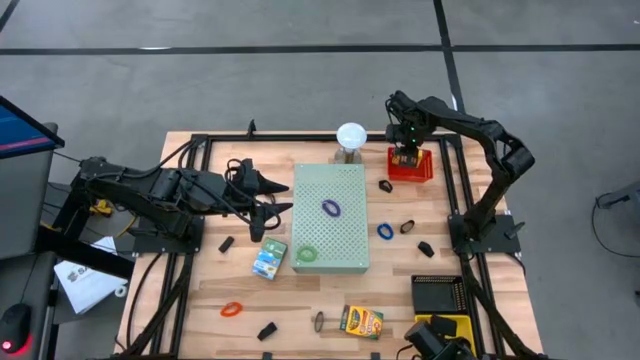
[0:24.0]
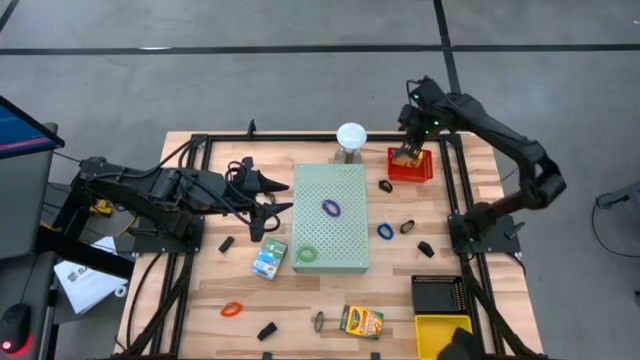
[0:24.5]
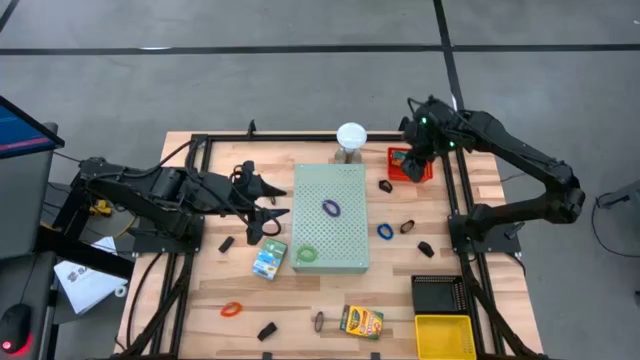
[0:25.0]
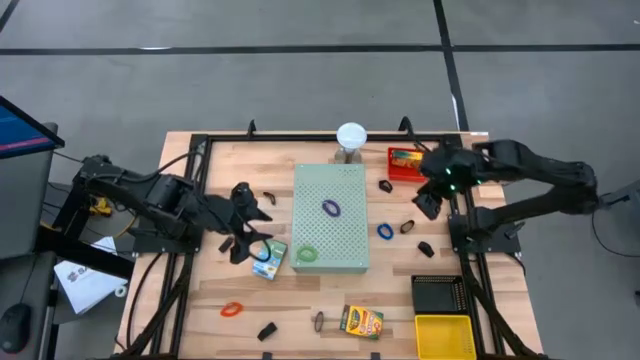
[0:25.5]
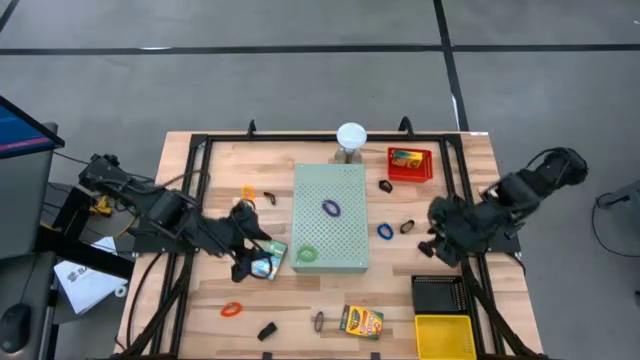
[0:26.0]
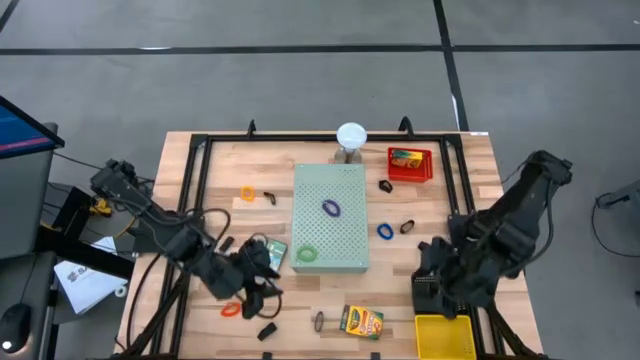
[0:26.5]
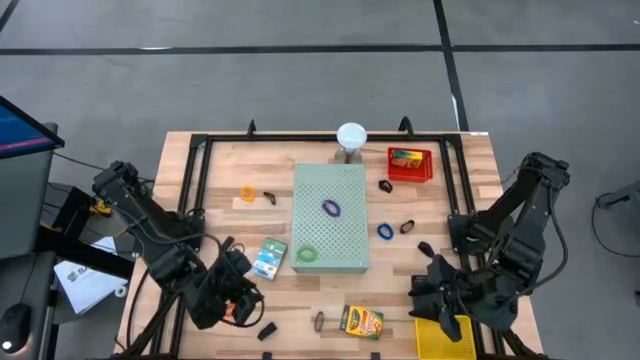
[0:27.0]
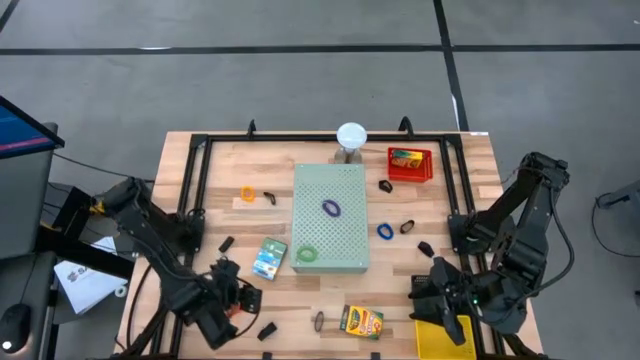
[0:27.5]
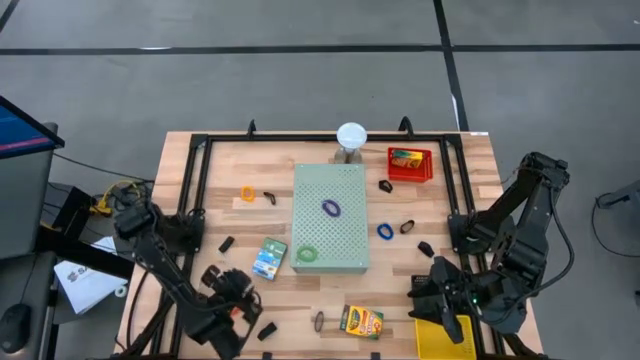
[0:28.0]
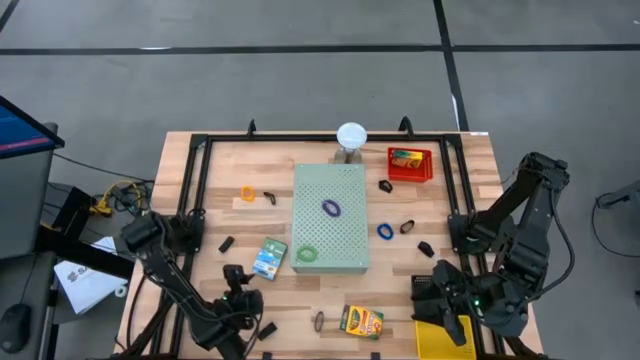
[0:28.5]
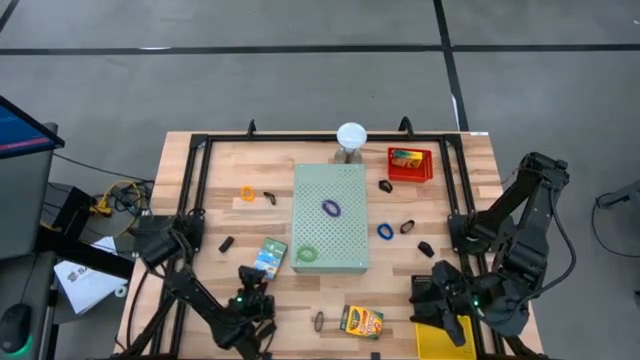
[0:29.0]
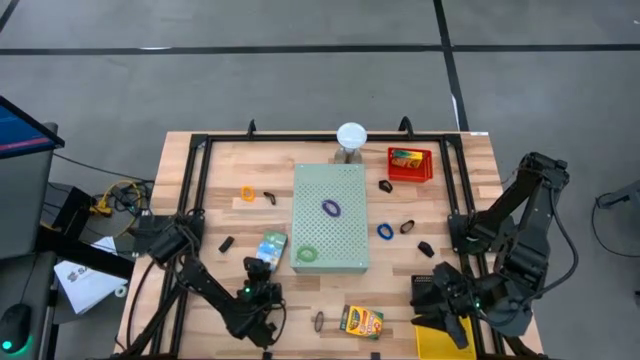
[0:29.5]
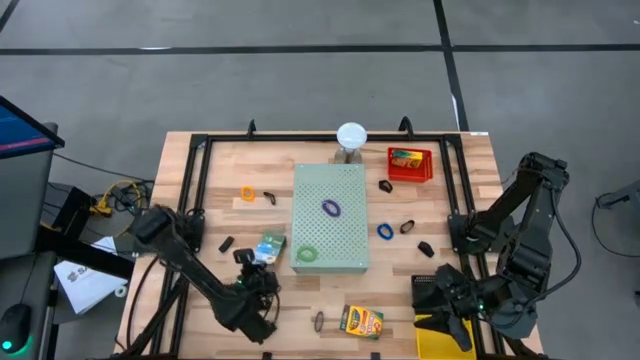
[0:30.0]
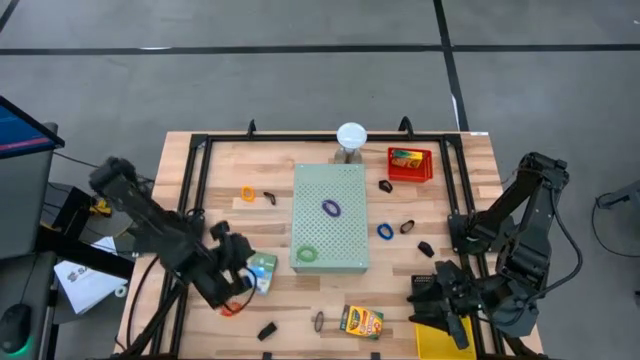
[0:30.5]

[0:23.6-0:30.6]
Task: Pick & Place Office Desk Supplies
Put the top yellow crayon box into the red bin

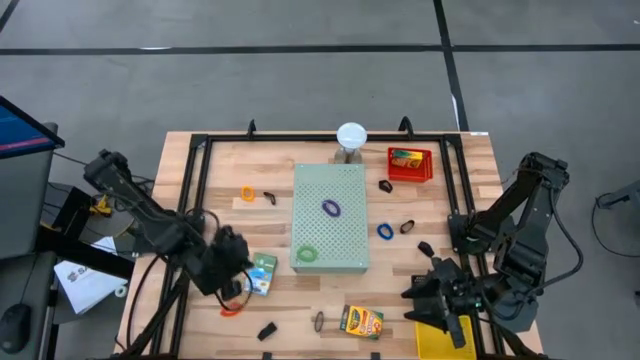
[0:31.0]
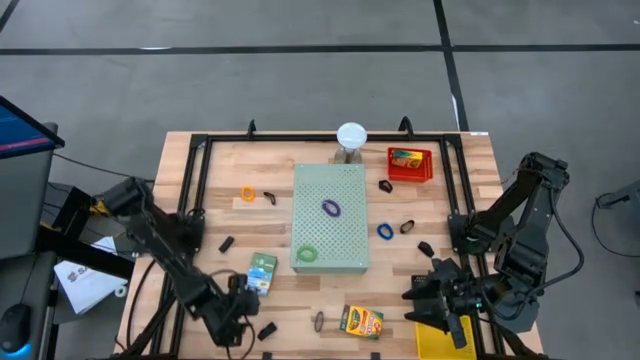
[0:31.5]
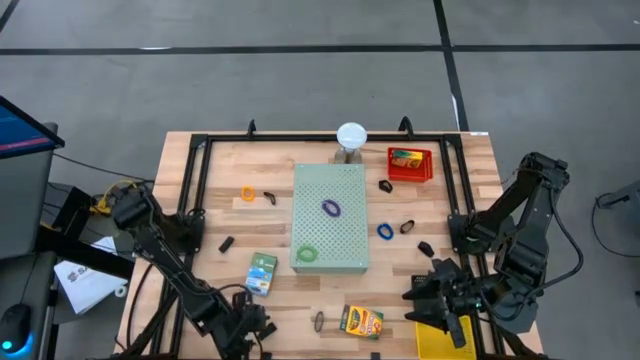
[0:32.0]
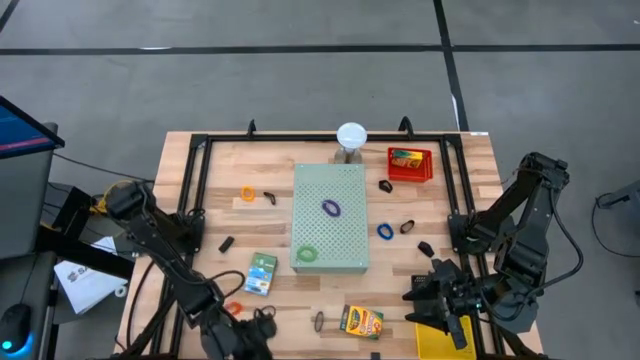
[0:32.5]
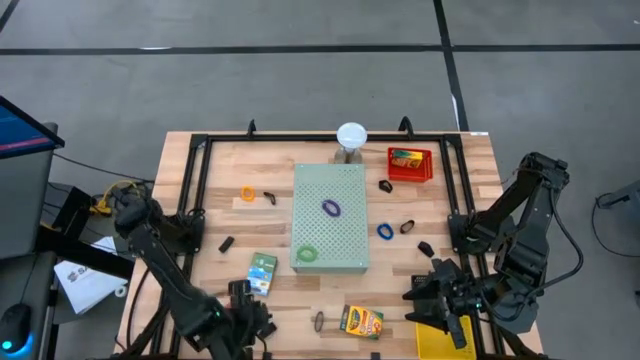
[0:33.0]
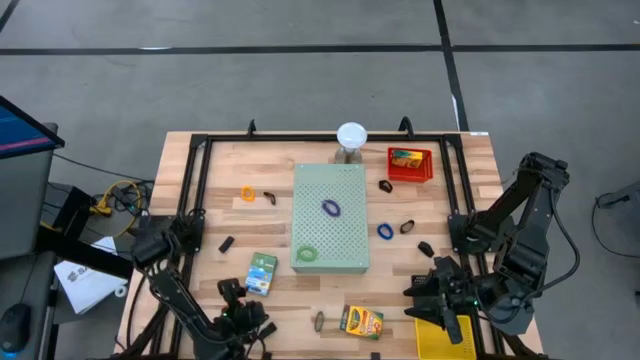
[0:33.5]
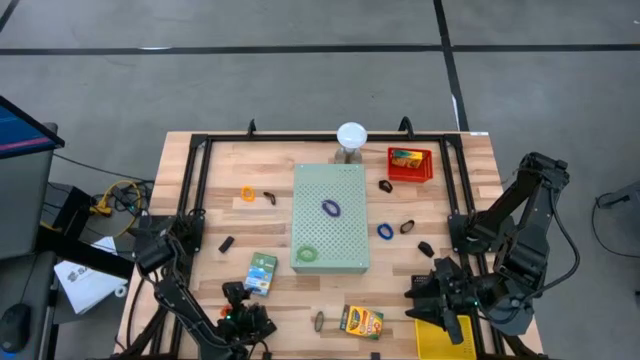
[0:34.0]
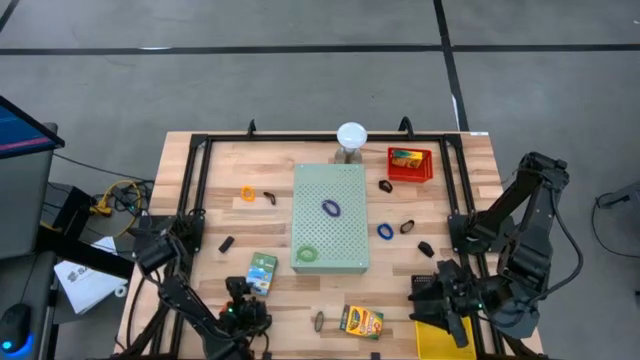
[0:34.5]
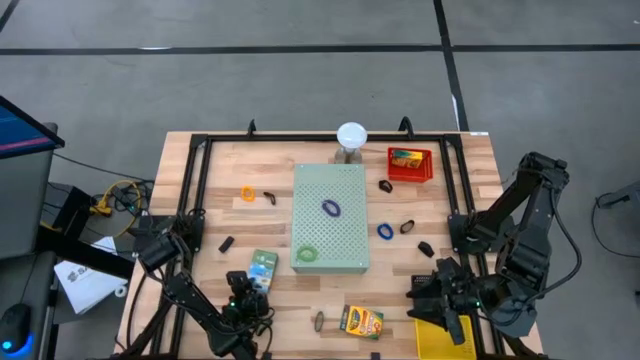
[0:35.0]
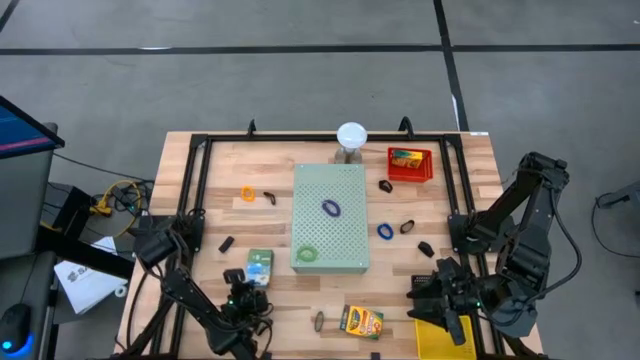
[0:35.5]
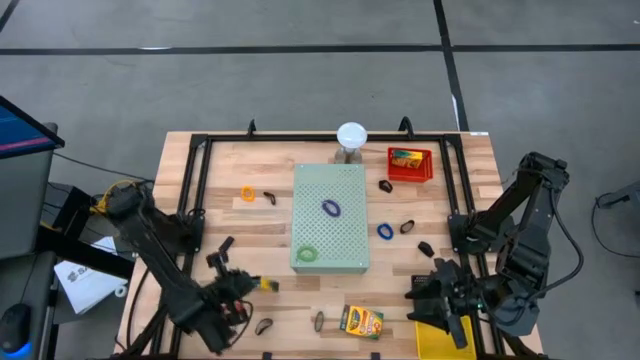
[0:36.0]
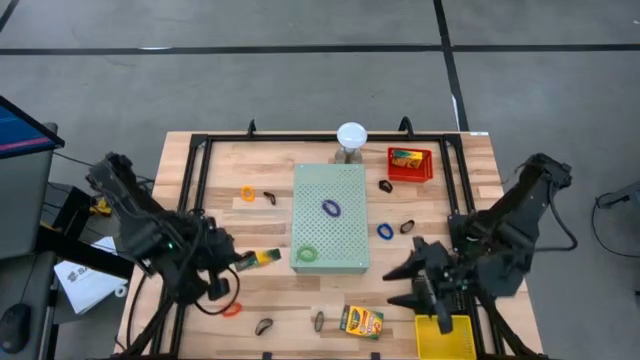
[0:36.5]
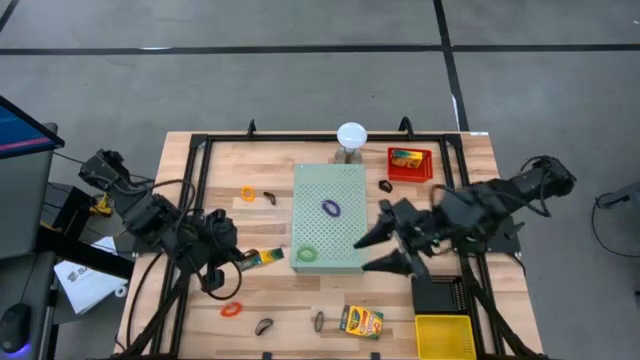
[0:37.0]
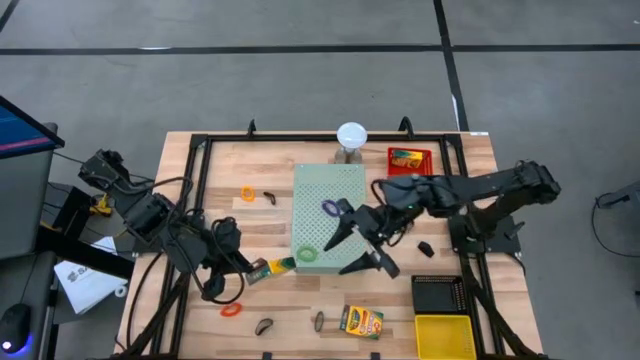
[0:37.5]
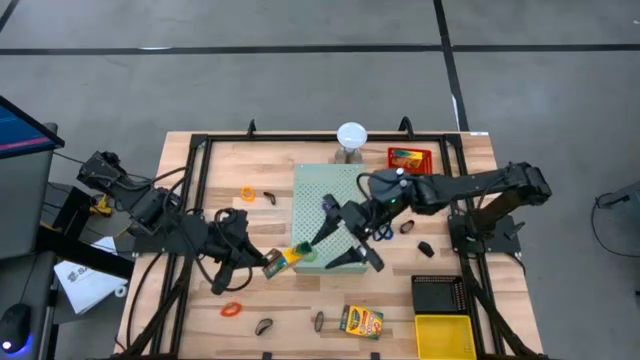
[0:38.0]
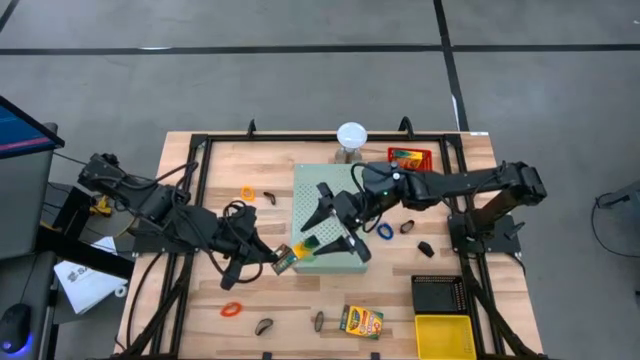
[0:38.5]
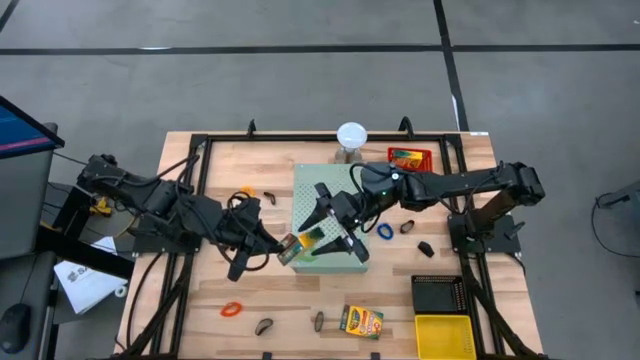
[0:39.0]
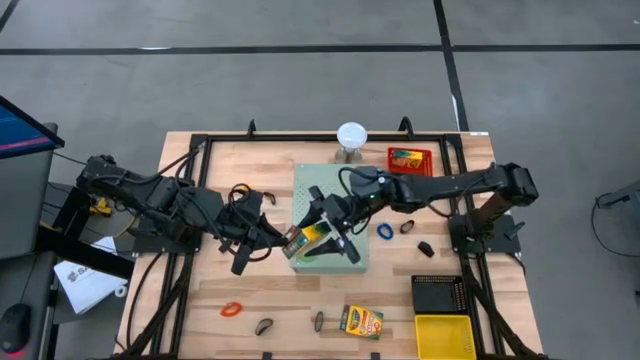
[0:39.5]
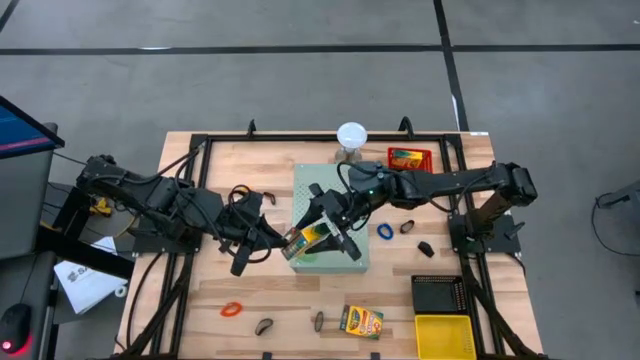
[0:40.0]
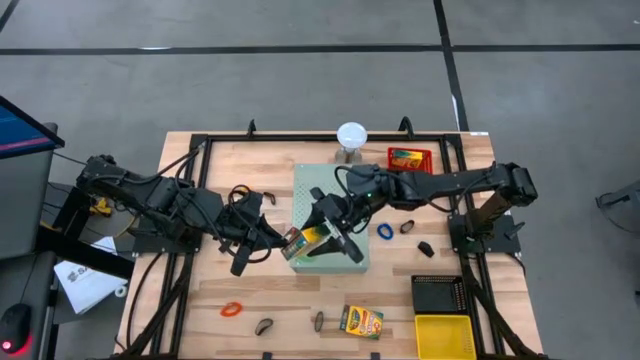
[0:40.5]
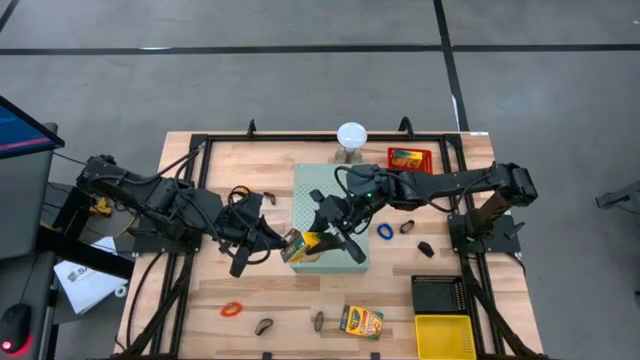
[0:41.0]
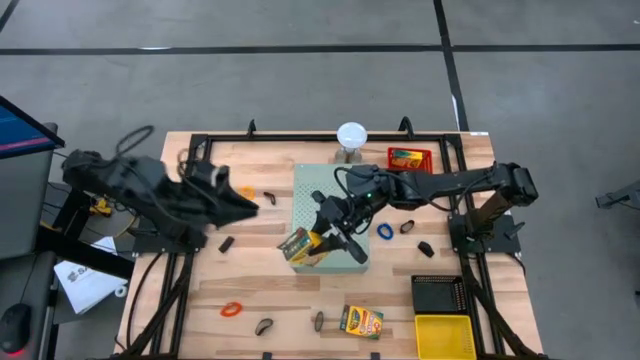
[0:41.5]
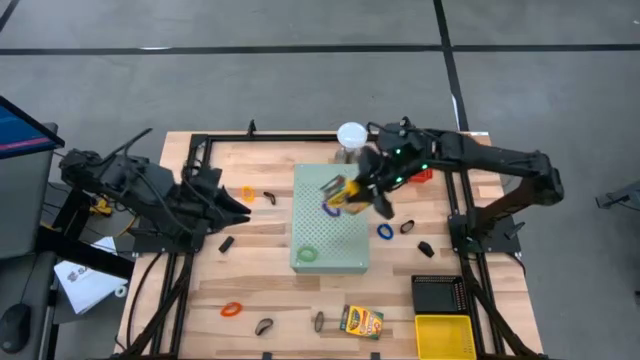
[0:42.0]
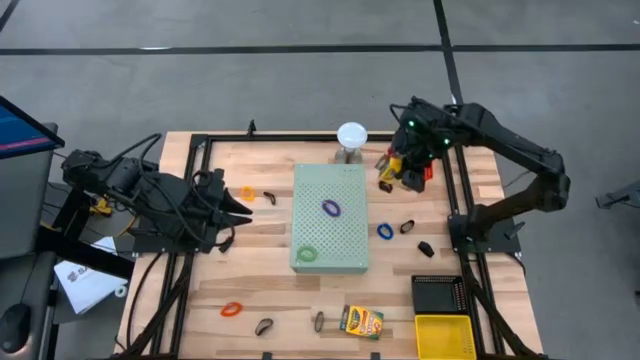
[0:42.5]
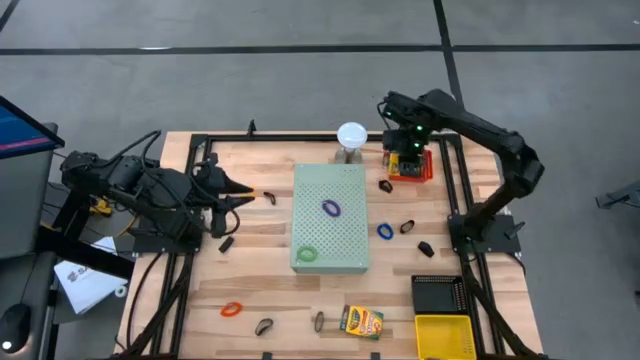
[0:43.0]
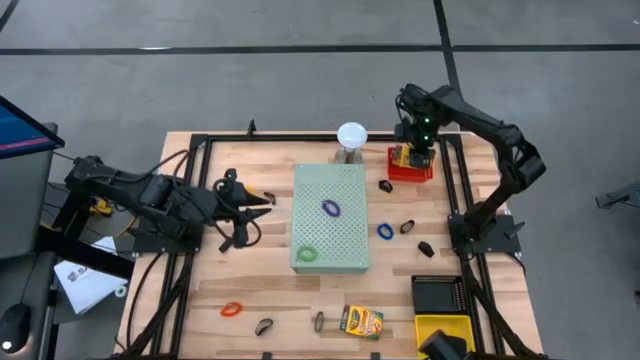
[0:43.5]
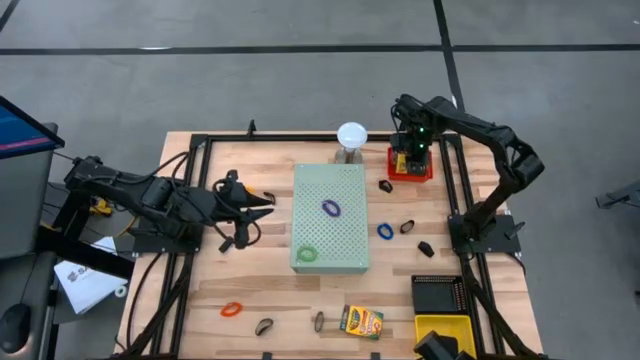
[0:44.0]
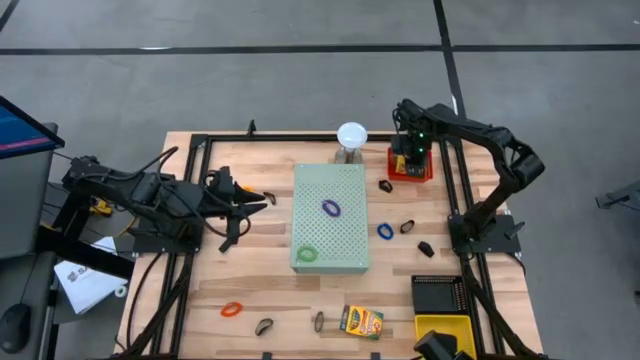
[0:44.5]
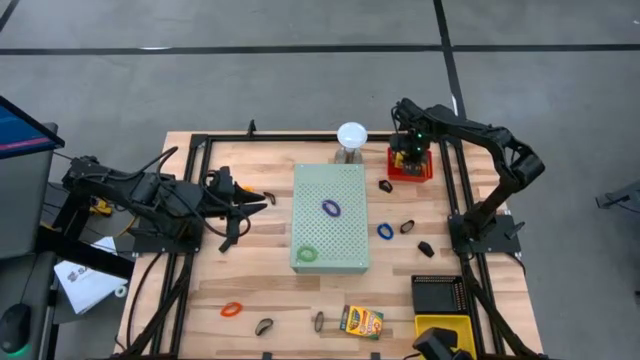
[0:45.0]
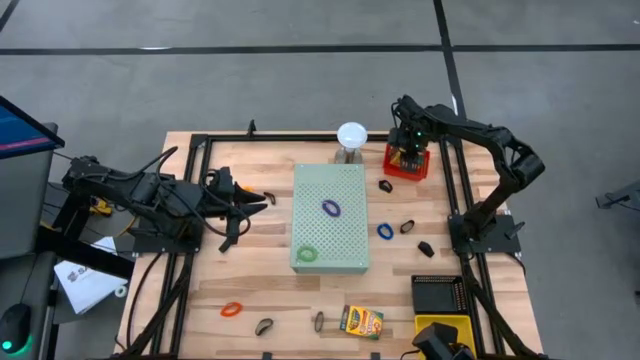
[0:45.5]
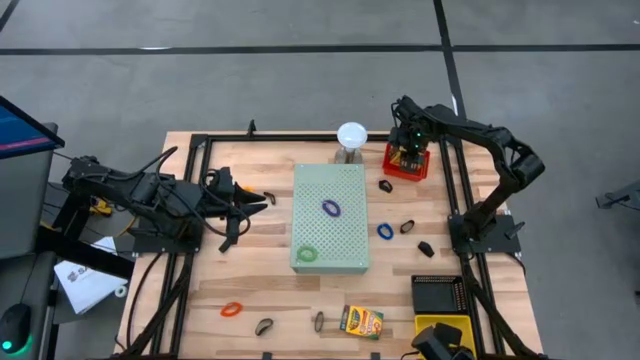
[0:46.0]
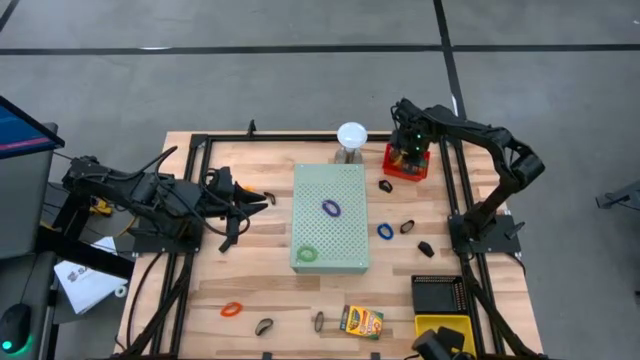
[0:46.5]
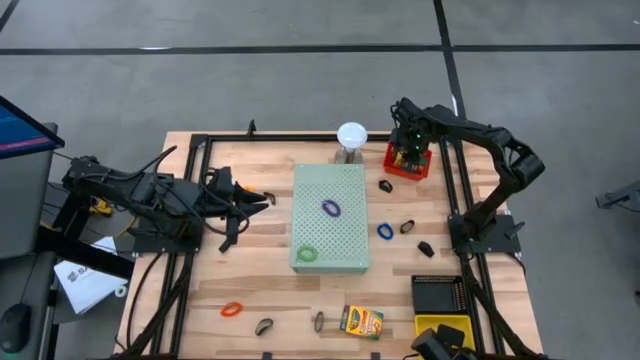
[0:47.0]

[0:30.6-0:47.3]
Put the top yellow crayon box into the red bin
